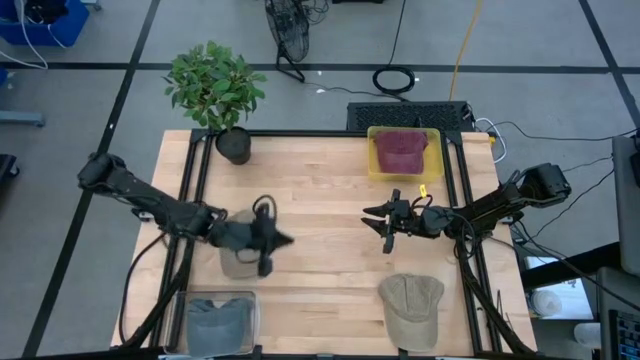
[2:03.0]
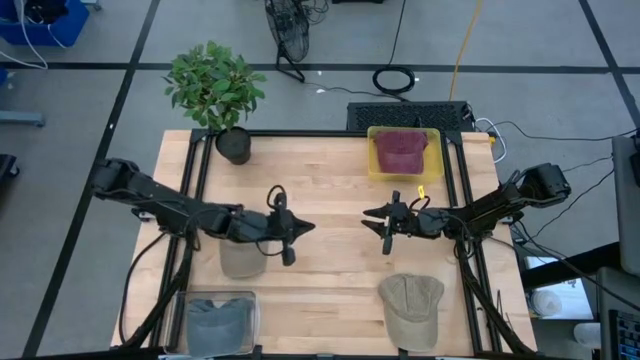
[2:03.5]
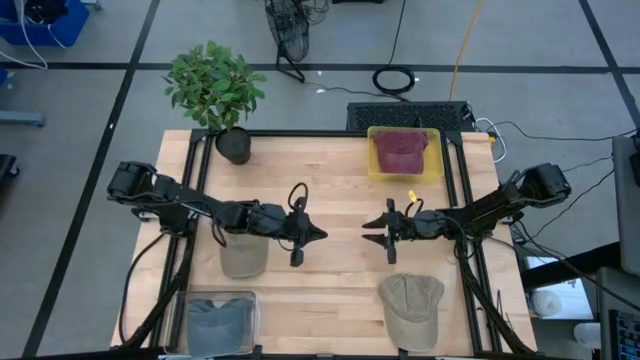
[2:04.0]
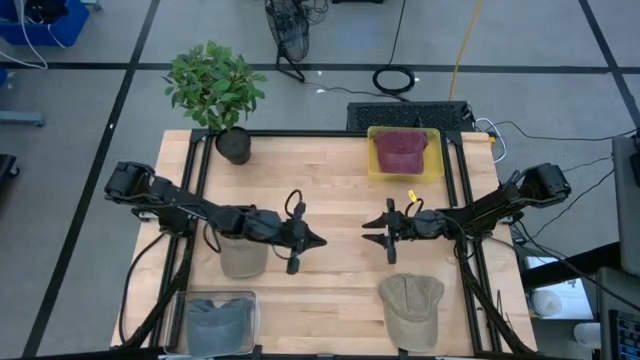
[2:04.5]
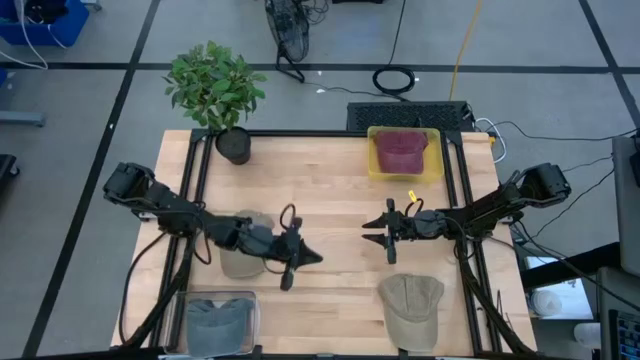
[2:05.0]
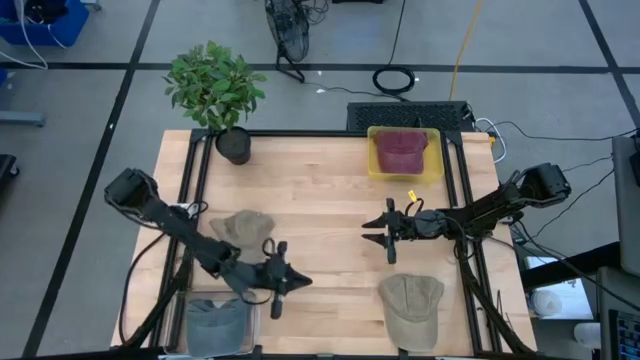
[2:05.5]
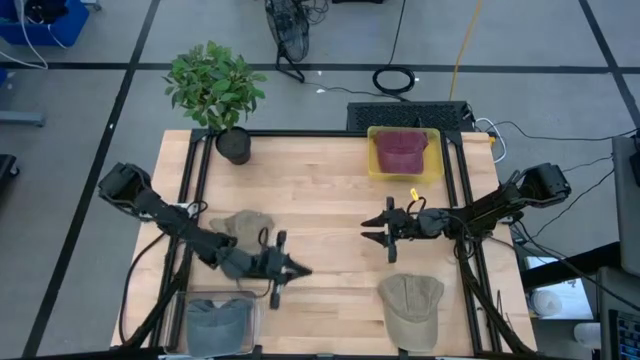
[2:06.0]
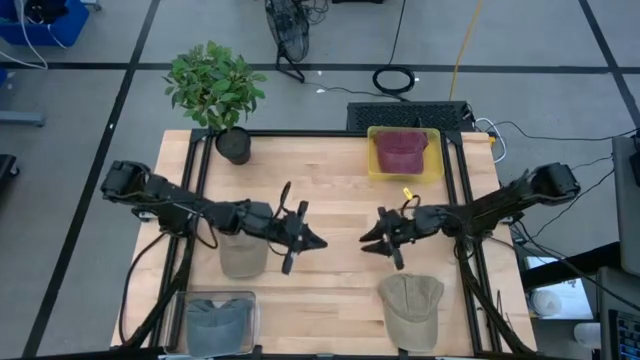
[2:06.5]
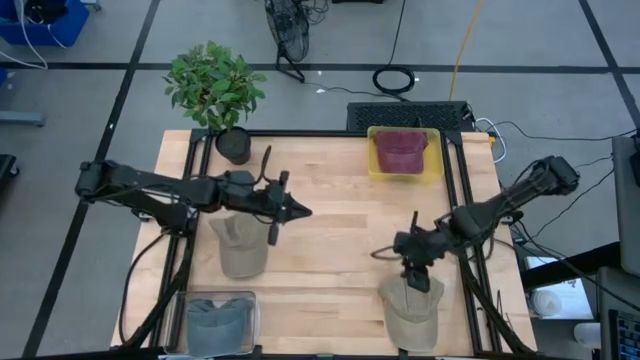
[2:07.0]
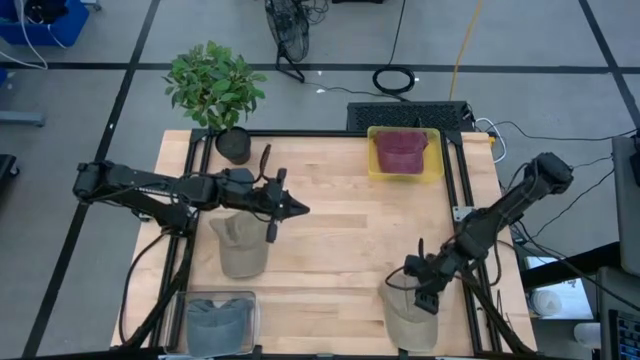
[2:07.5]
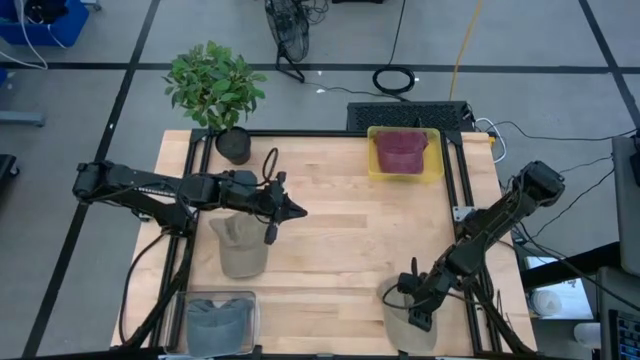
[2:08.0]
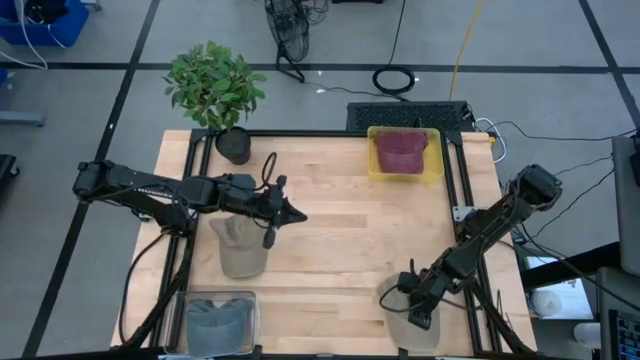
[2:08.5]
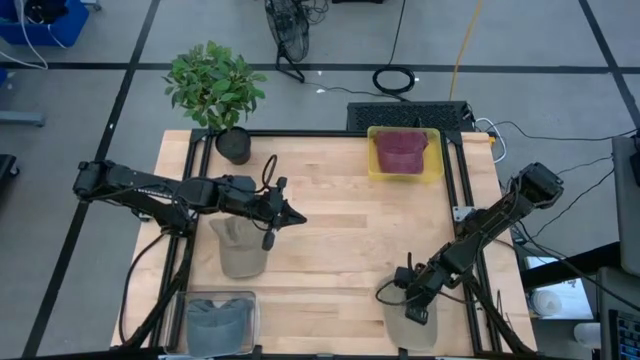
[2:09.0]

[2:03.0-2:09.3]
Task: Pick & Place hat
Put the bottom brown cap into the yellow bin

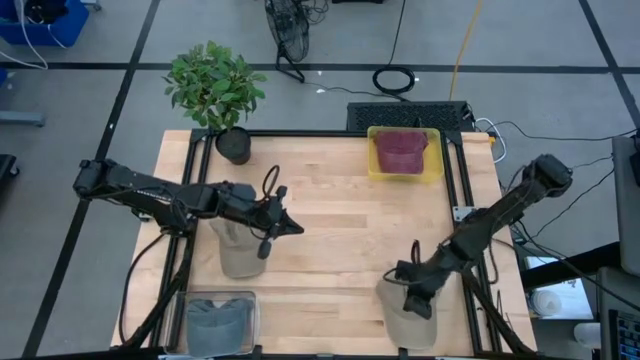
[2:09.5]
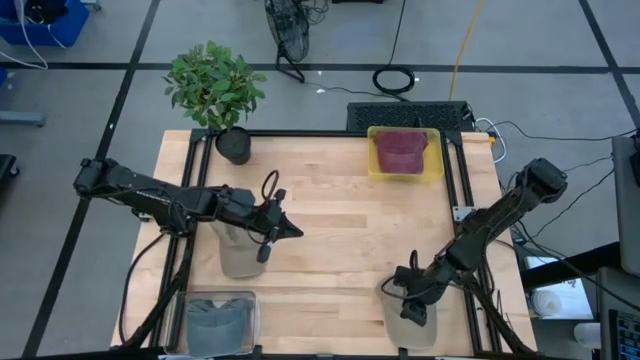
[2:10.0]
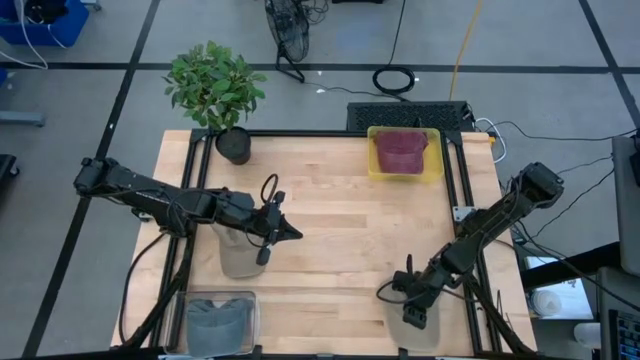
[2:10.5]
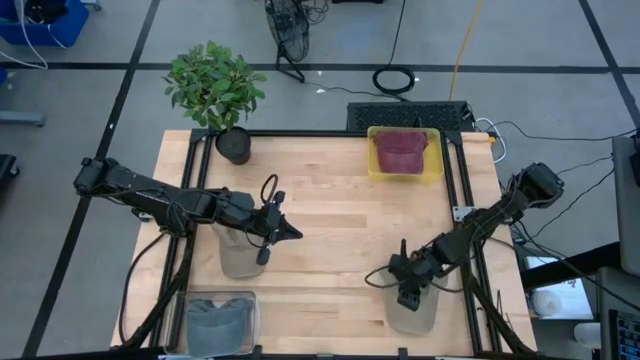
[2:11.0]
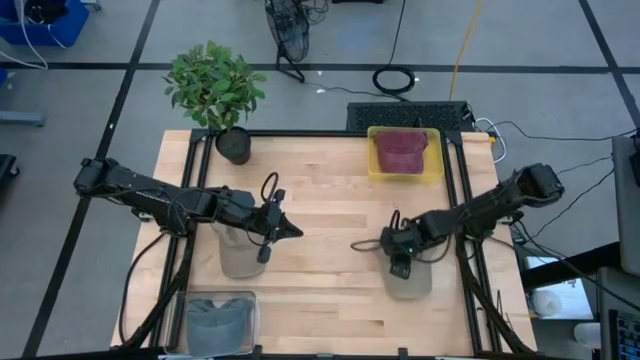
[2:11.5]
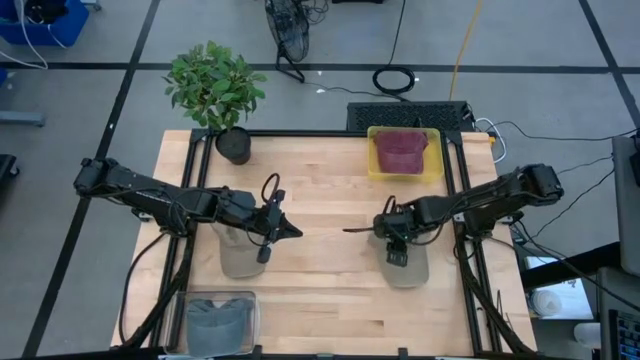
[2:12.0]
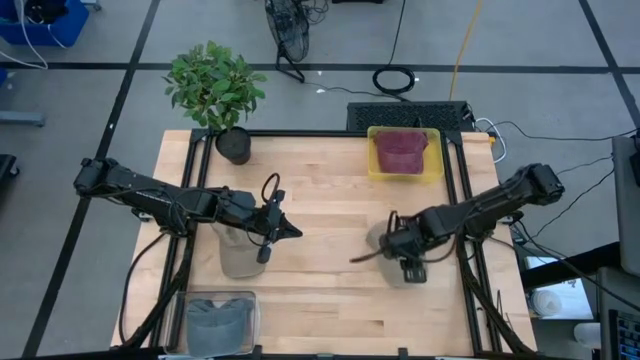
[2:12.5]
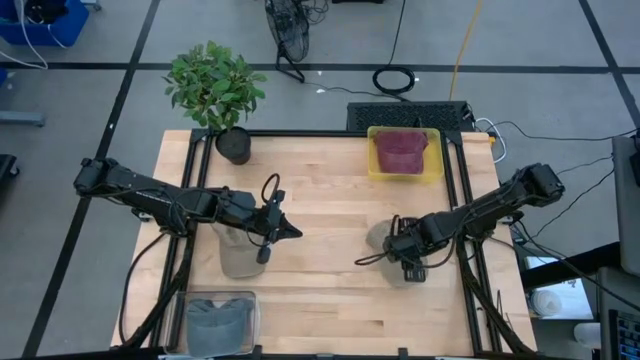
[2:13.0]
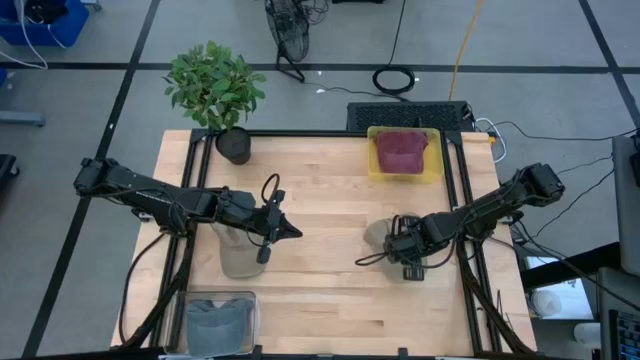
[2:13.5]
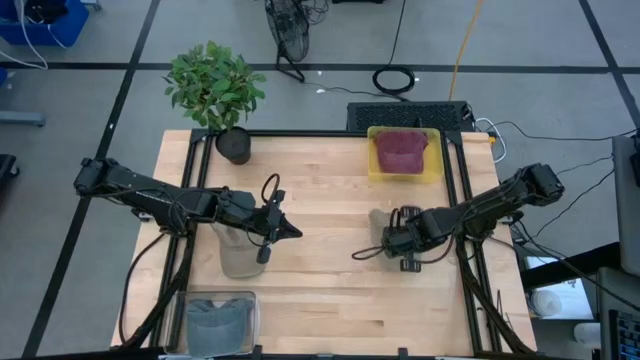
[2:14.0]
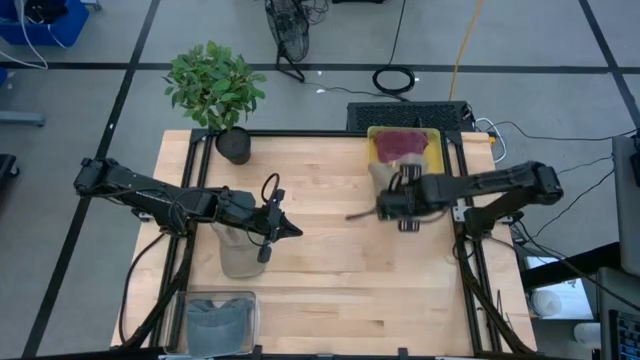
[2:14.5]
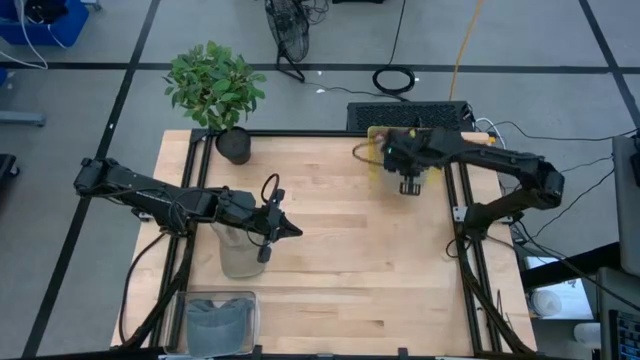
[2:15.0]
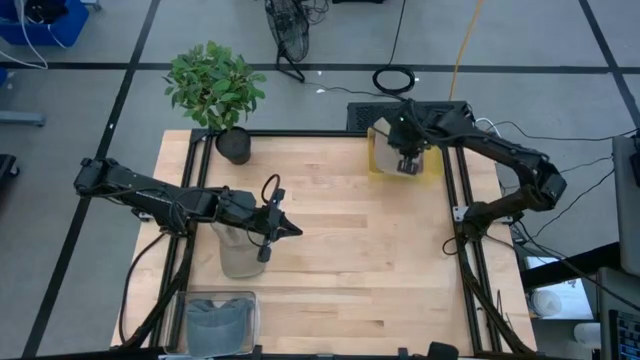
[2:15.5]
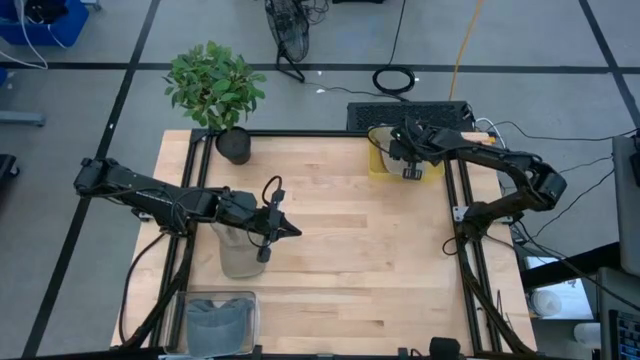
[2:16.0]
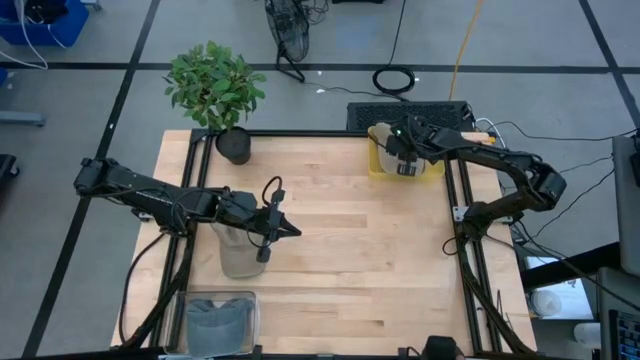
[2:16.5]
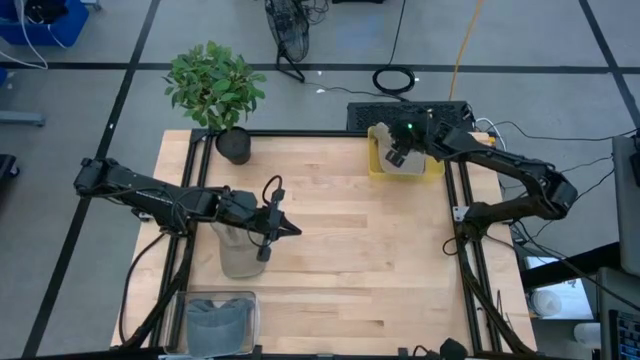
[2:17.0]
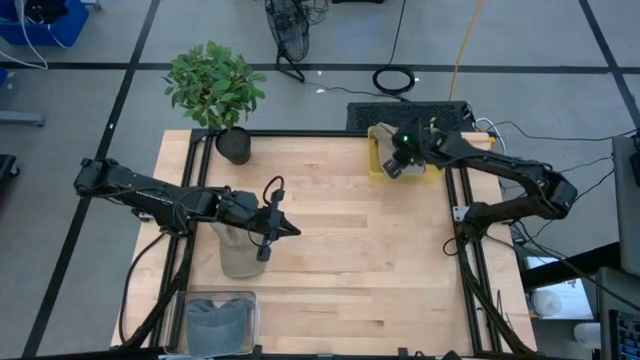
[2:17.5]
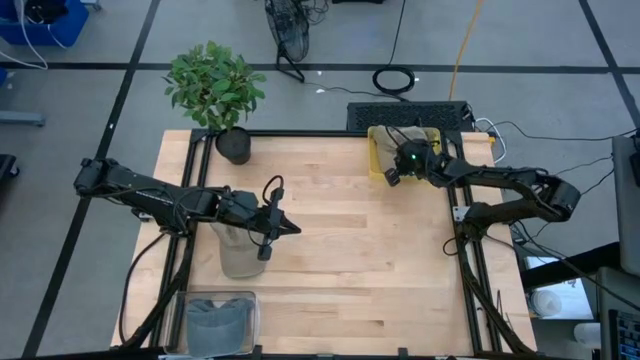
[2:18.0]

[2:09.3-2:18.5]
Put the brown cap into the yellow bin

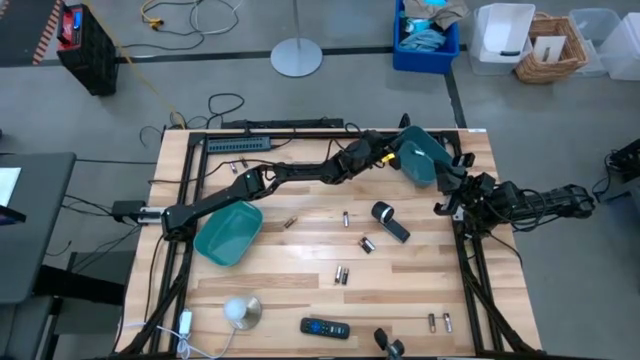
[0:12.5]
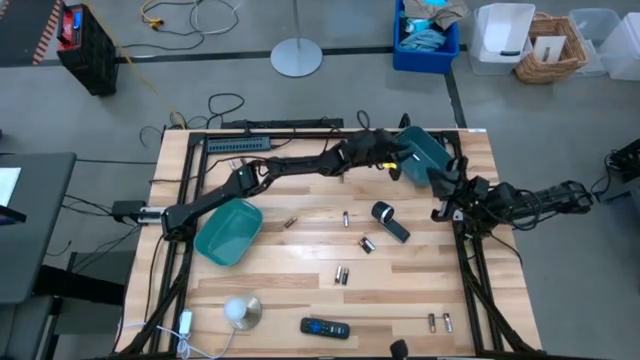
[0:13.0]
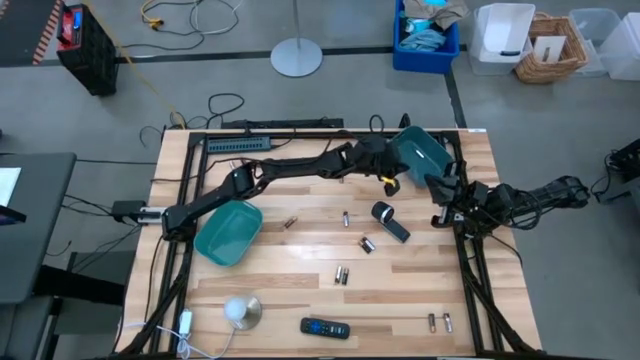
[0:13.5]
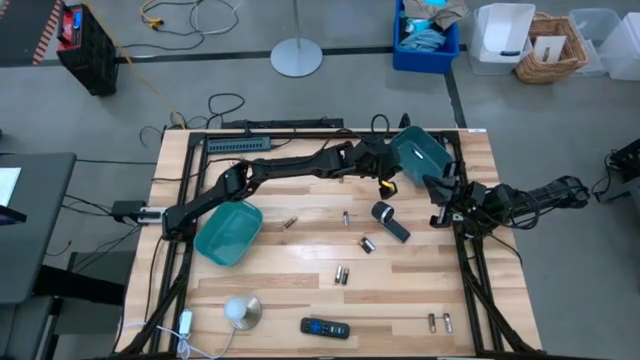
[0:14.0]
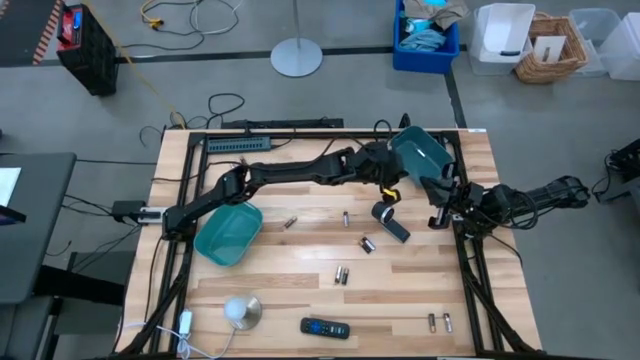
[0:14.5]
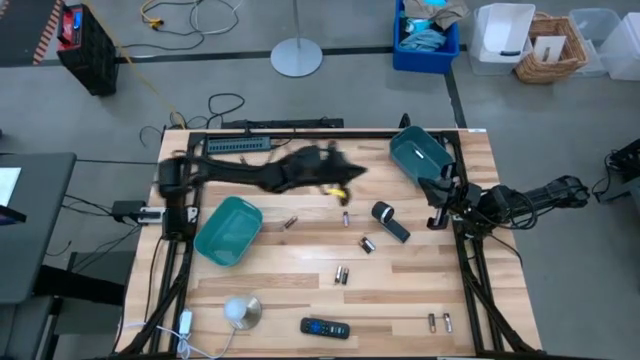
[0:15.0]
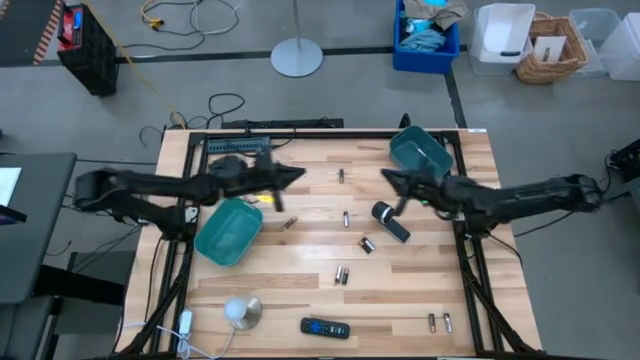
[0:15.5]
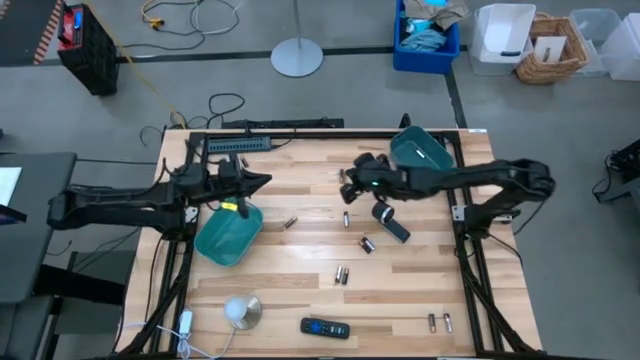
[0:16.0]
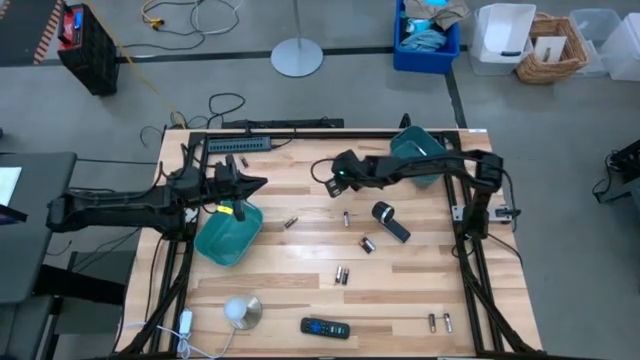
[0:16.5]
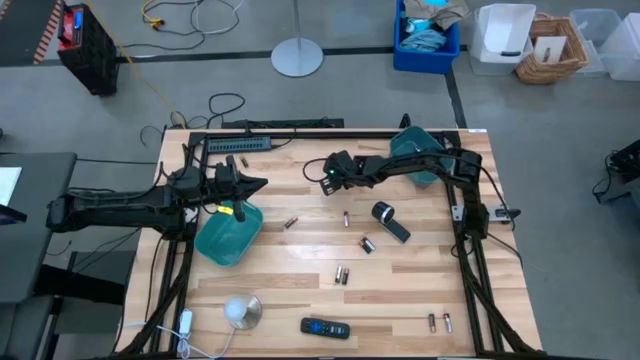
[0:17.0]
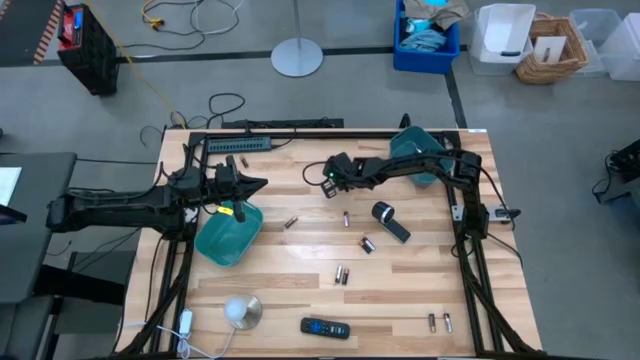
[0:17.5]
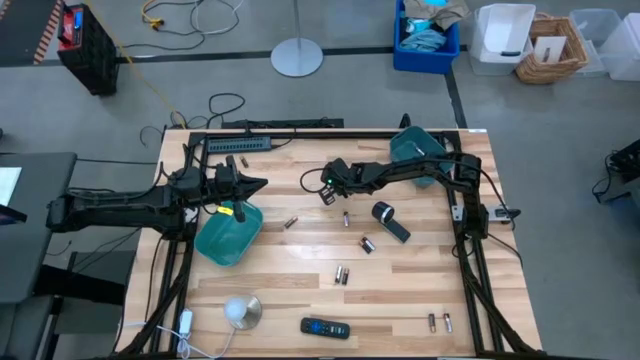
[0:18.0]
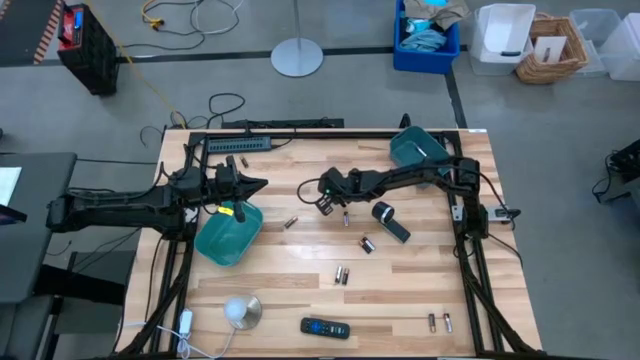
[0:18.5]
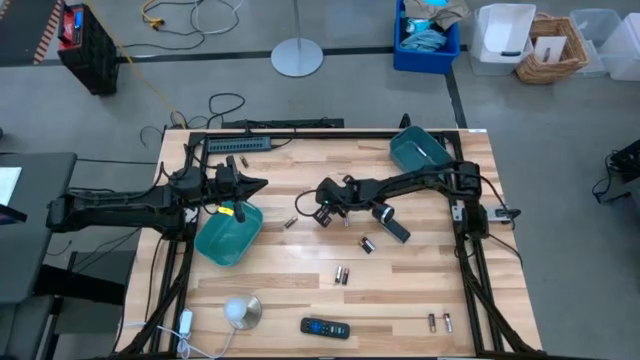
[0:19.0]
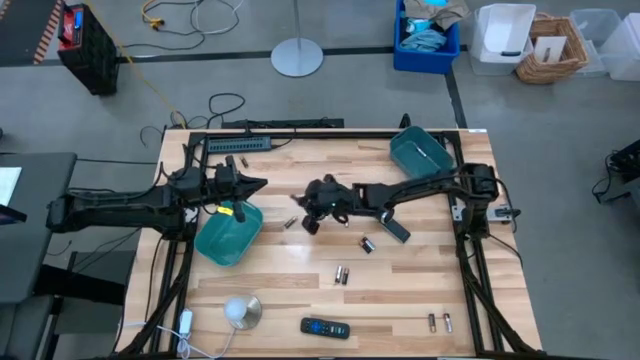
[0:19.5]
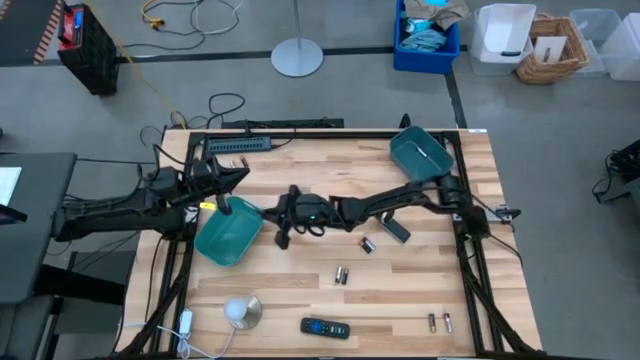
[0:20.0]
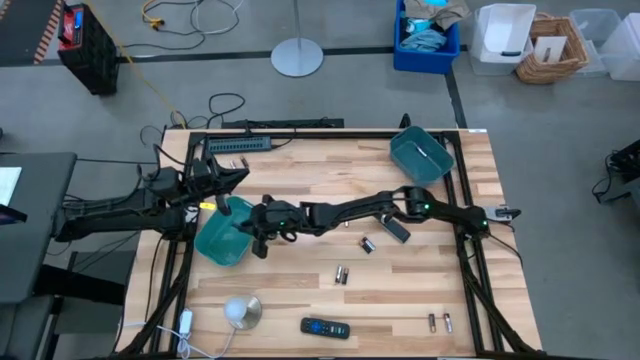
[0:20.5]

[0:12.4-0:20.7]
Task: Sort batteries
Put the black battery into the green bin
